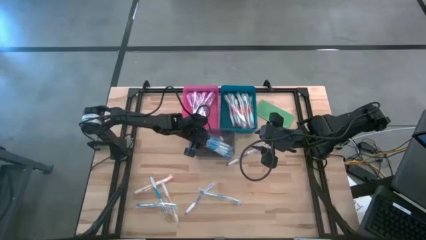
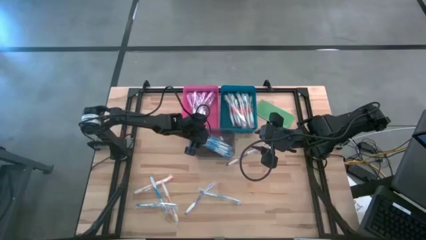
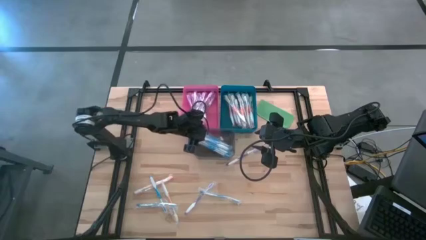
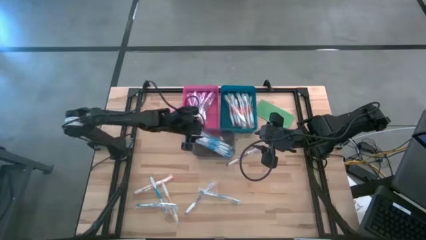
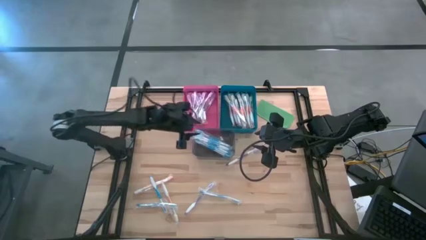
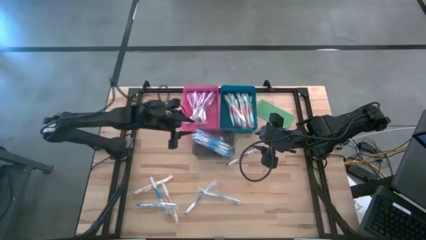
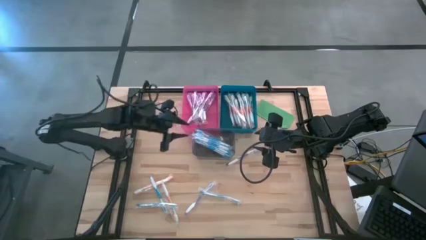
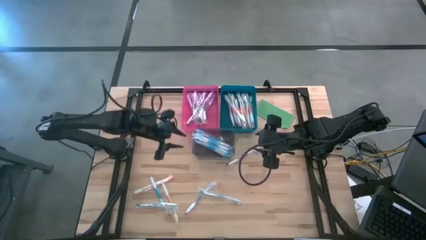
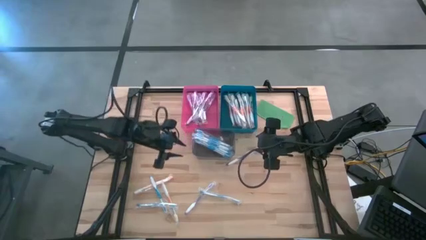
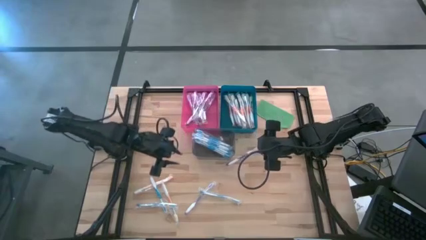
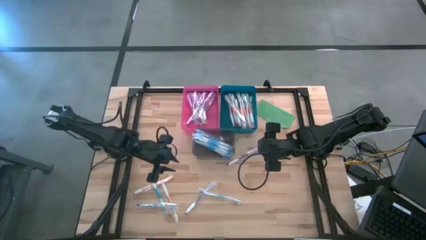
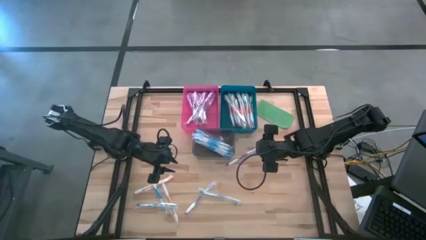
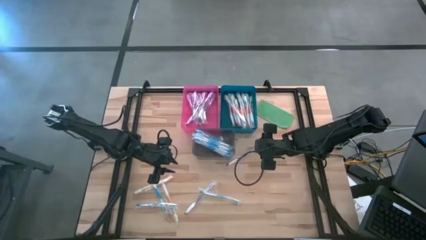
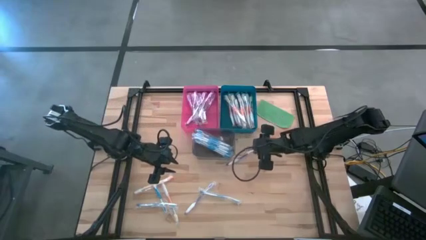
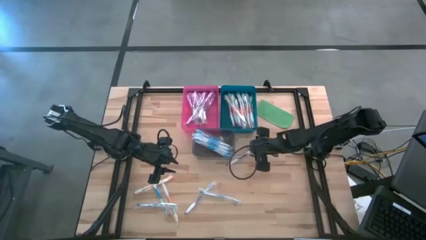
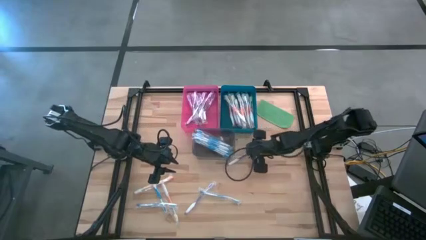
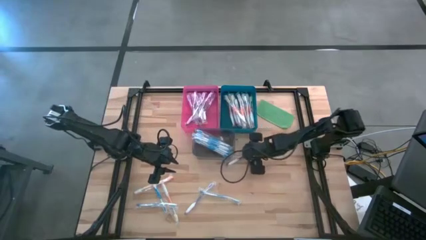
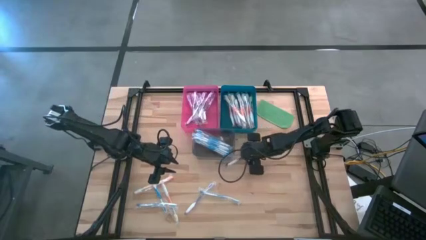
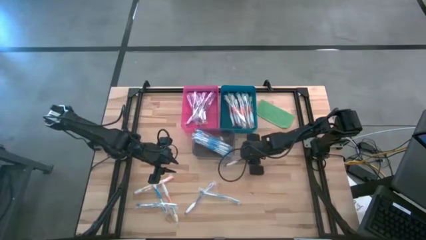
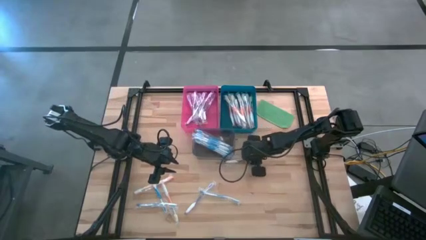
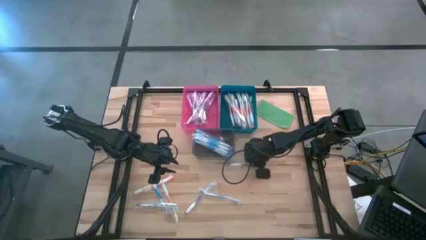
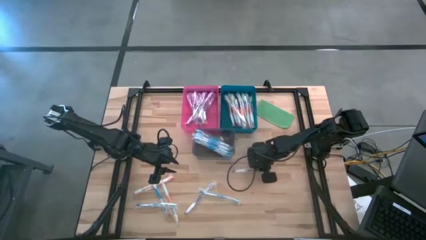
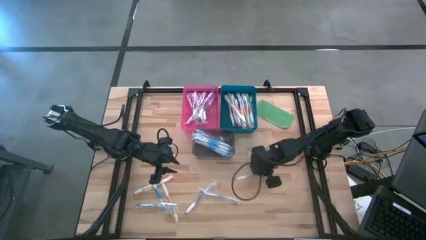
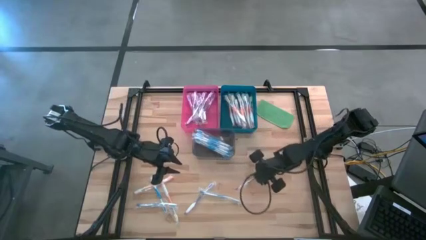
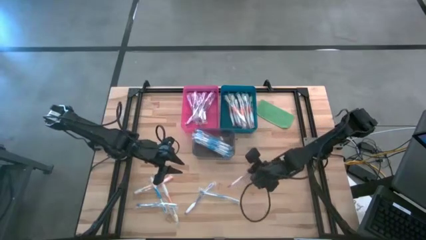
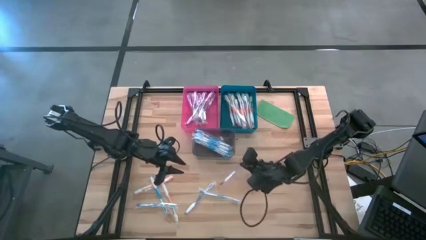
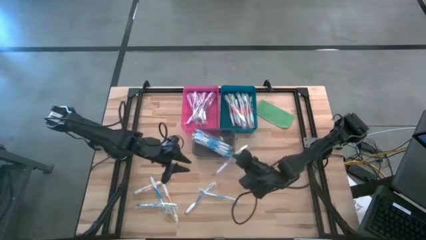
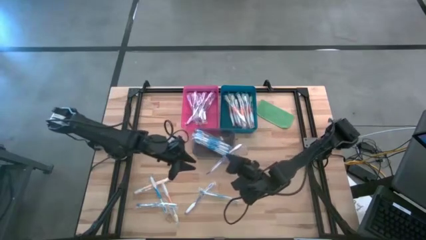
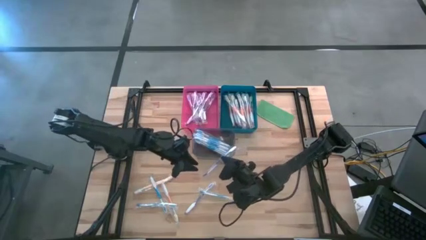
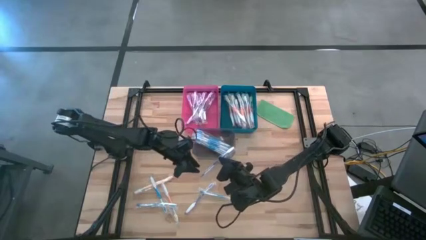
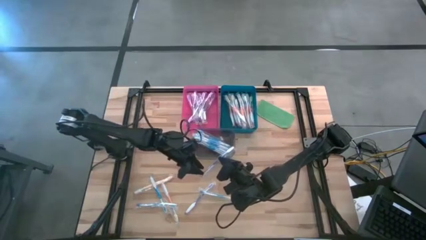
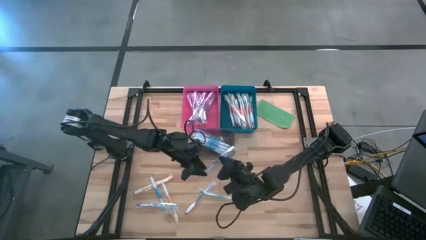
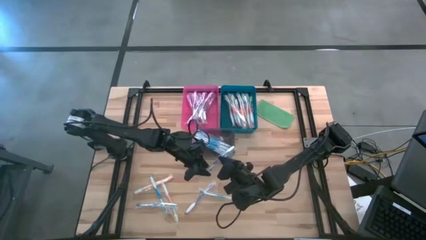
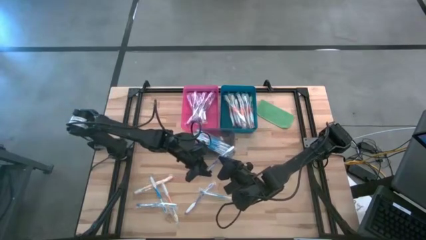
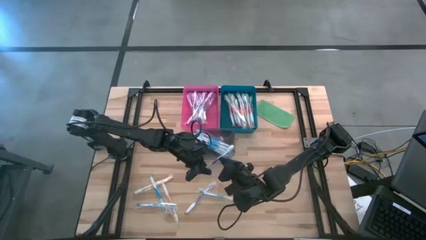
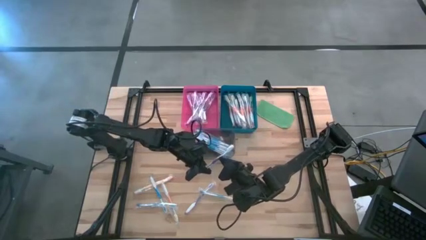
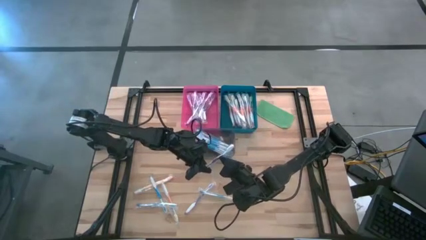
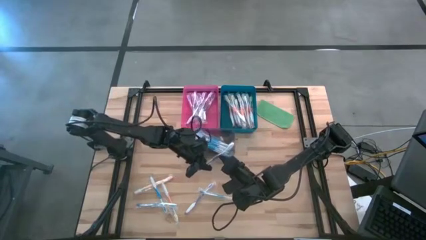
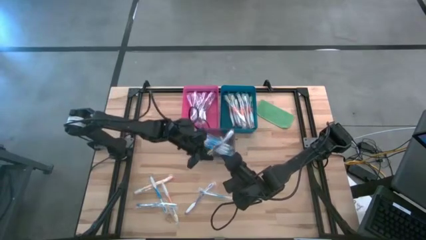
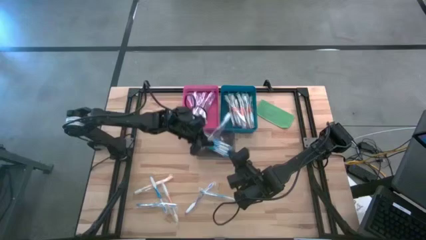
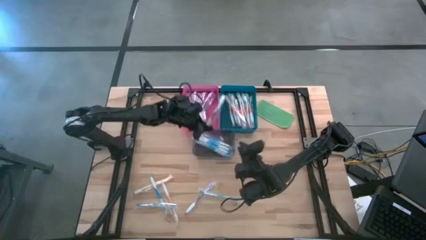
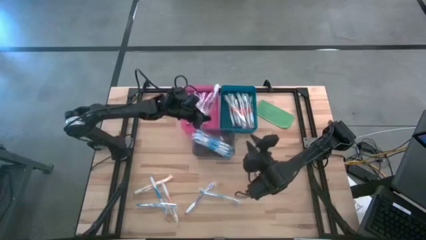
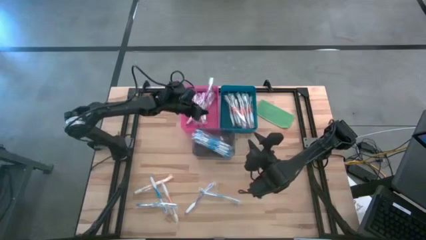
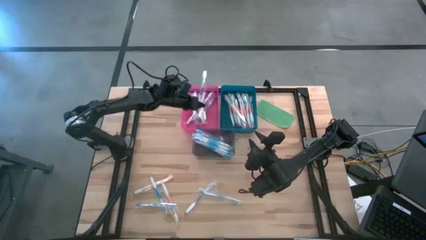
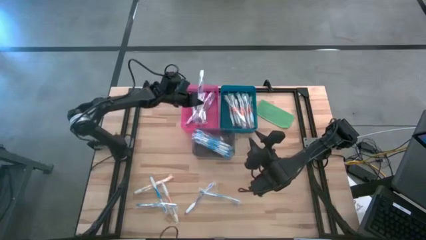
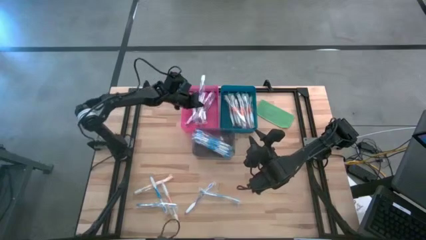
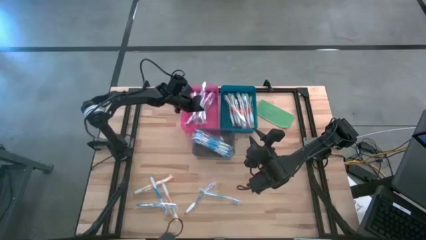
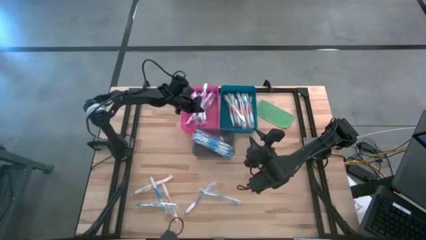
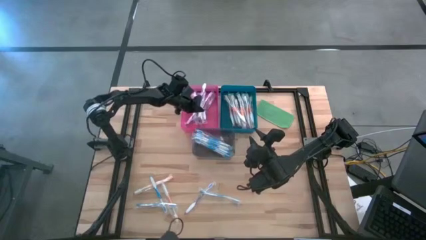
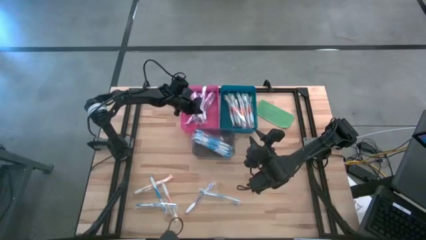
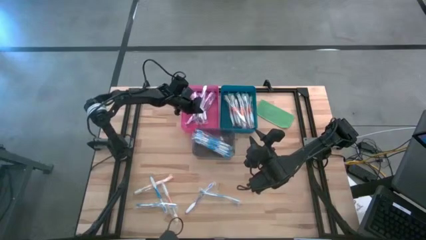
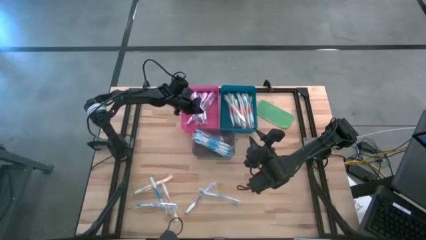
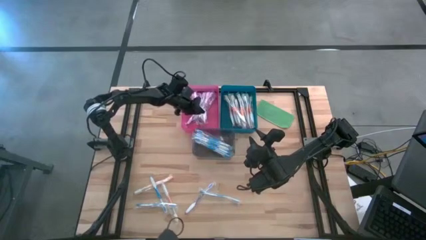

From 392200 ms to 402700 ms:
Task: Pick & Place Toothbrushes
Put the purple toothbrush into the pink bin

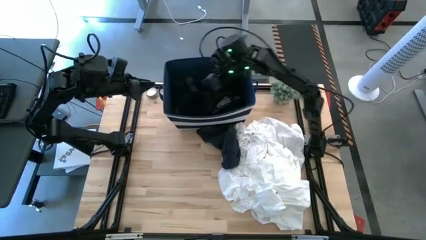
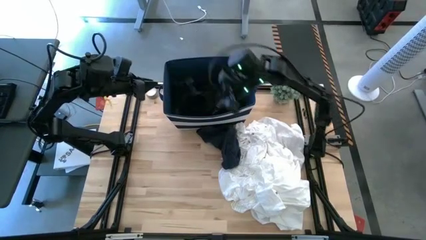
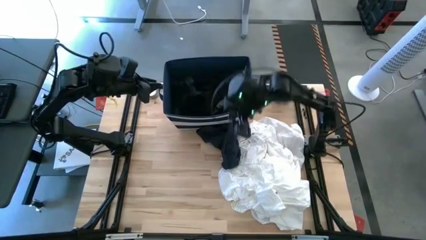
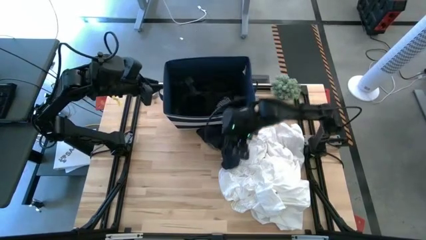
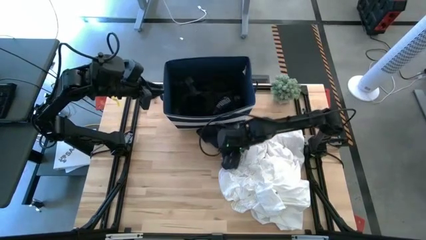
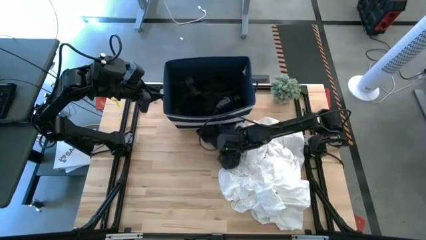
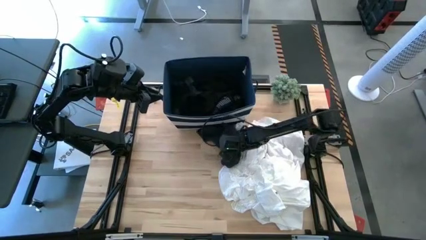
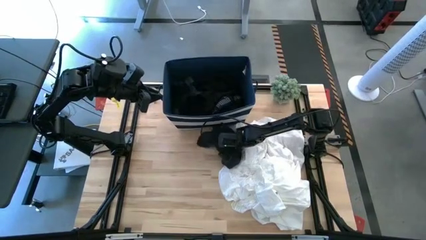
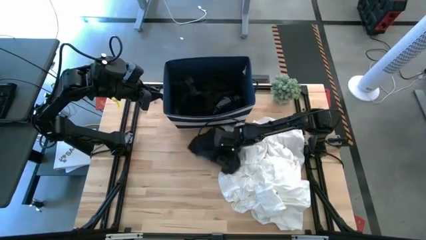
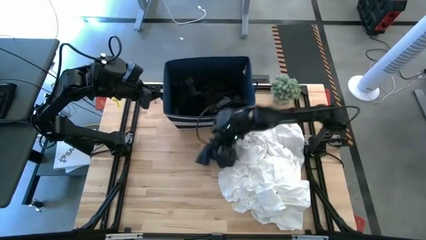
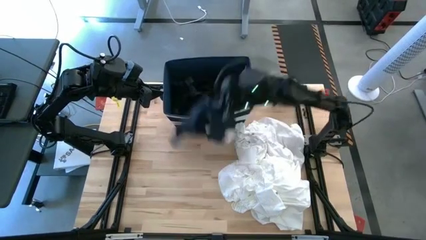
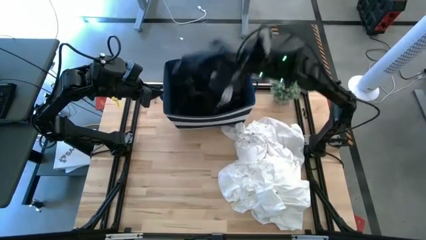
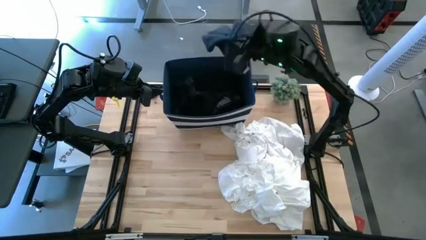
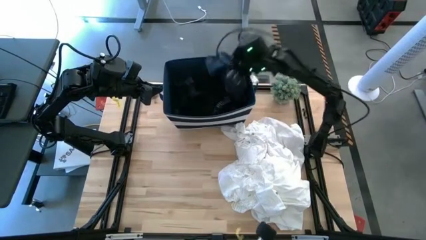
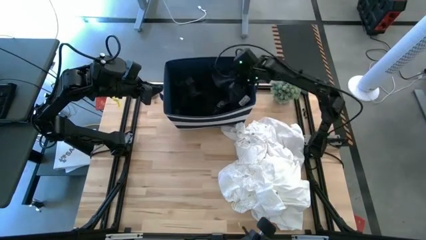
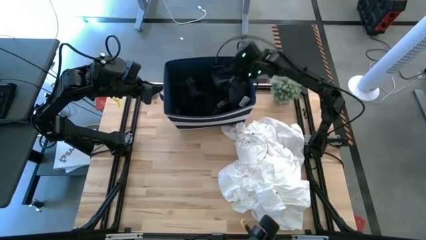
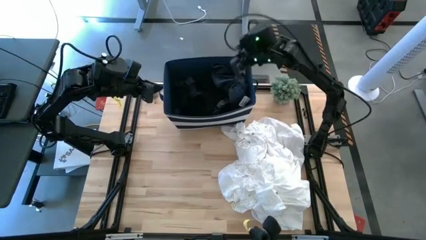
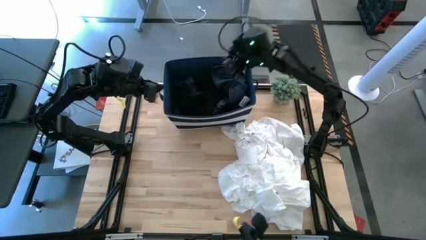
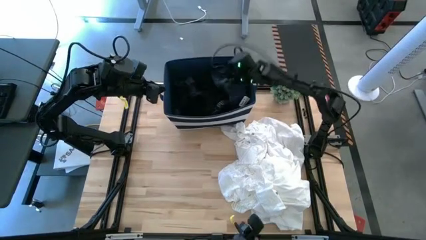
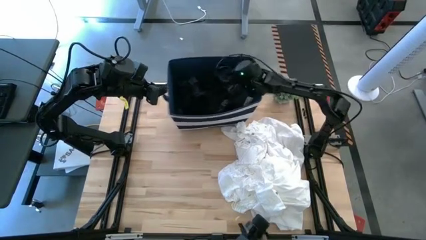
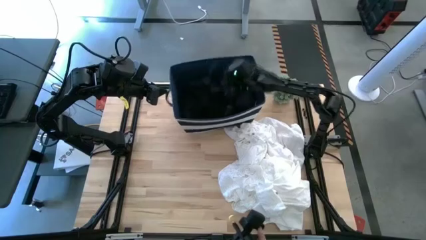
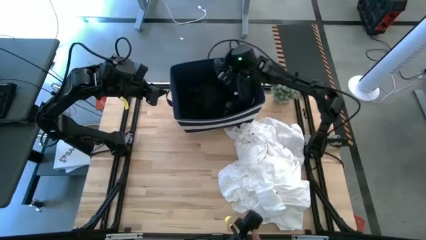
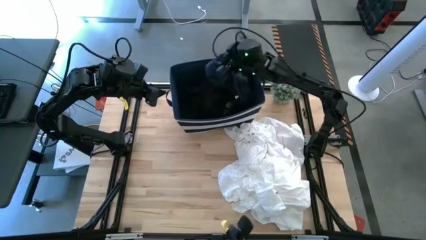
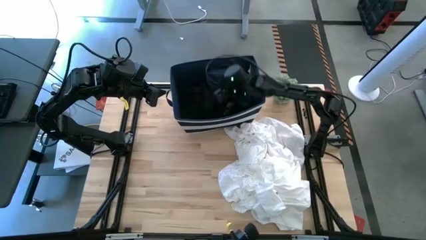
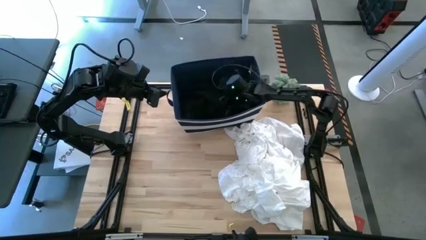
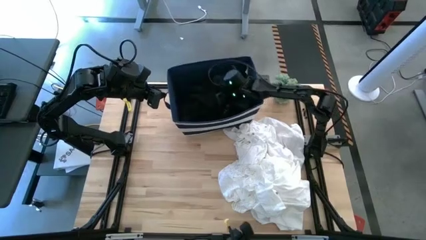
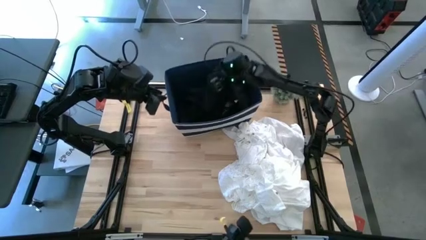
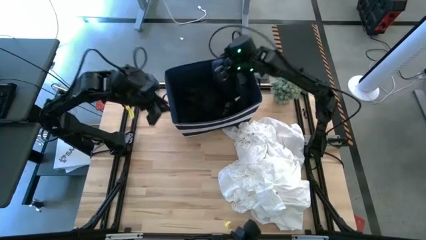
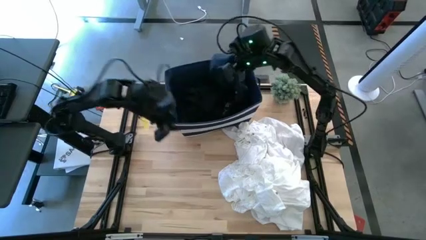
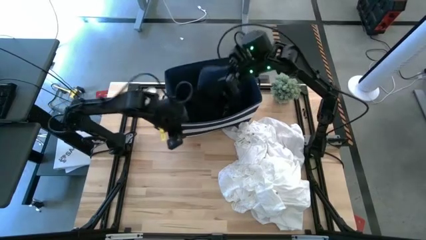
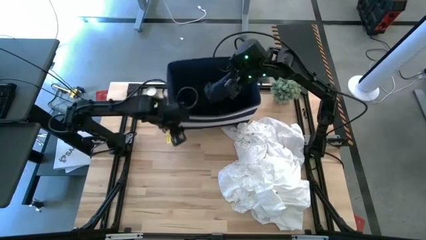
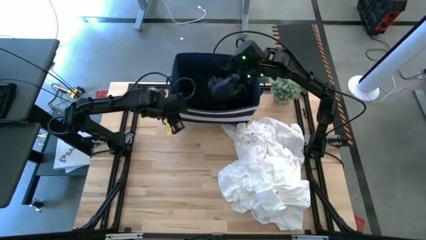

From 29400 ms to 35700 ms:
Task: Sort clothes
Put the blue underwear into the blue bin
